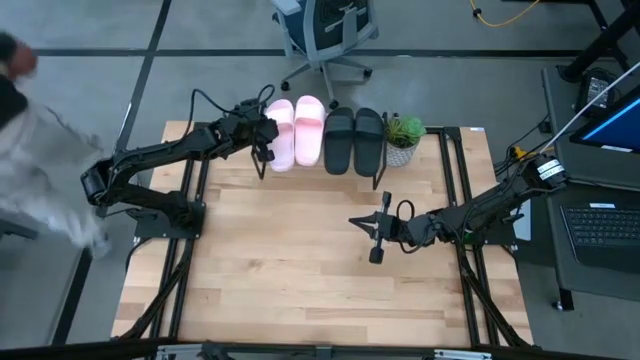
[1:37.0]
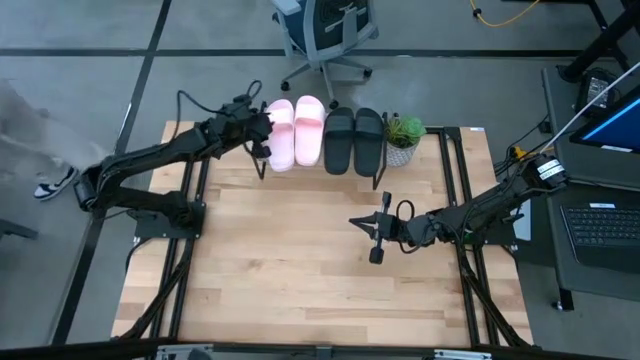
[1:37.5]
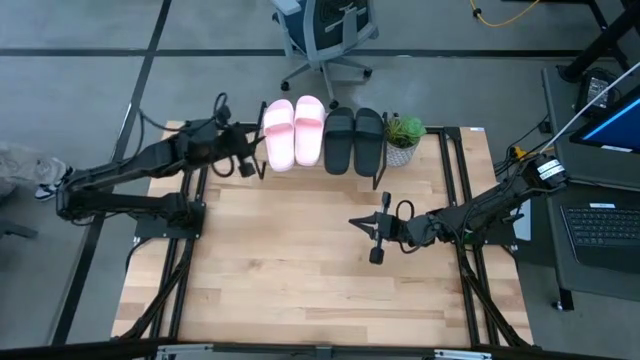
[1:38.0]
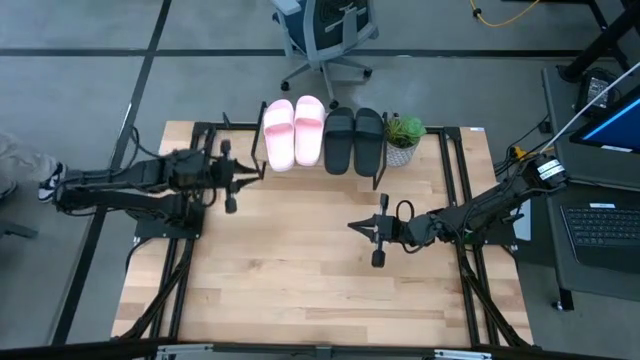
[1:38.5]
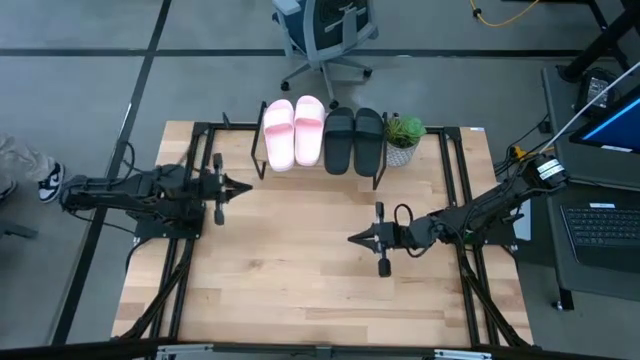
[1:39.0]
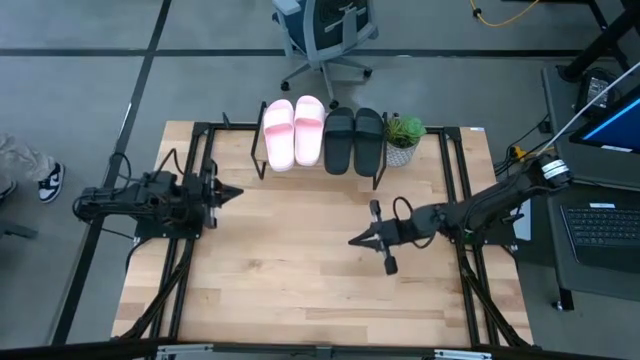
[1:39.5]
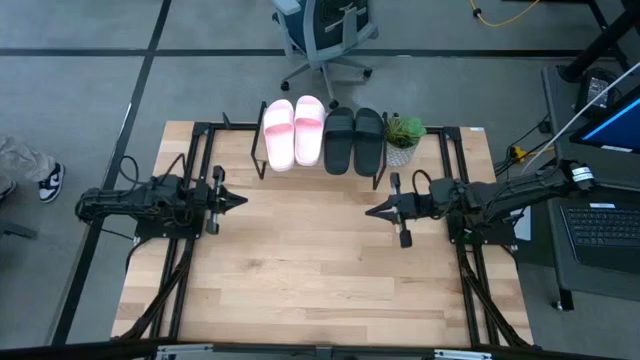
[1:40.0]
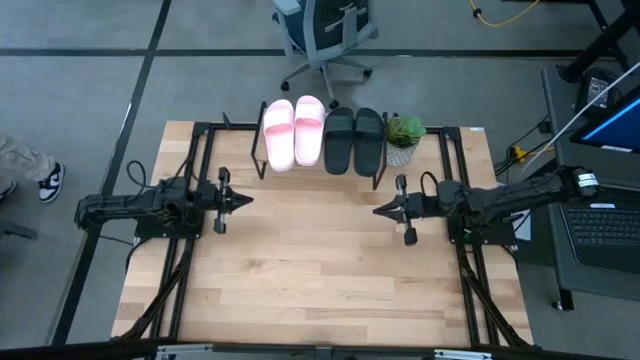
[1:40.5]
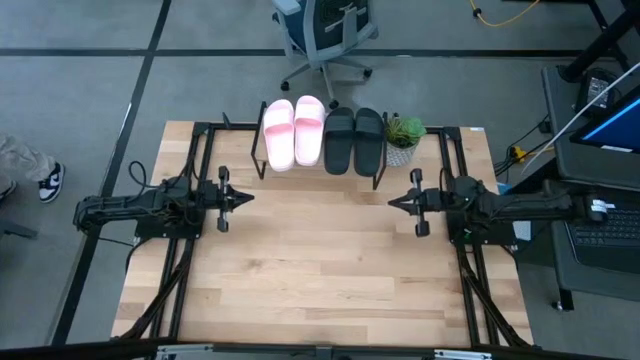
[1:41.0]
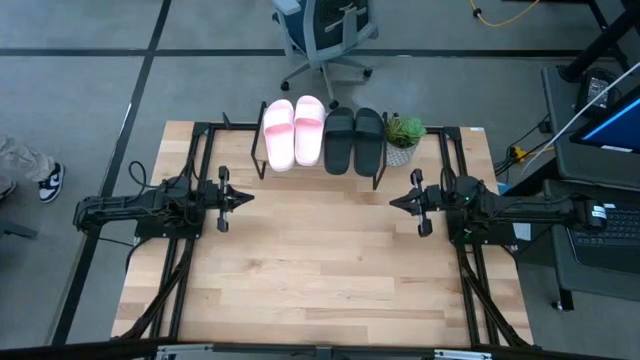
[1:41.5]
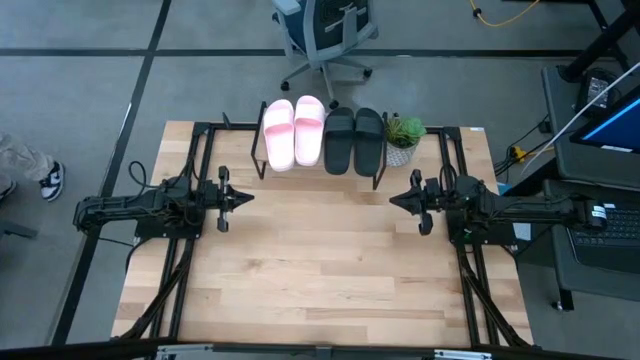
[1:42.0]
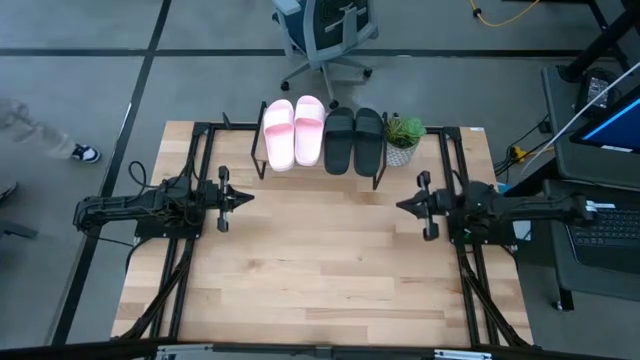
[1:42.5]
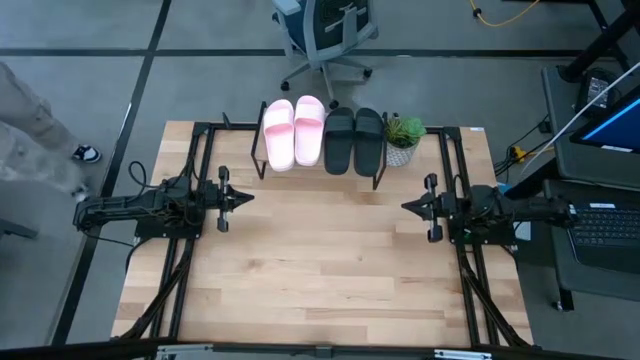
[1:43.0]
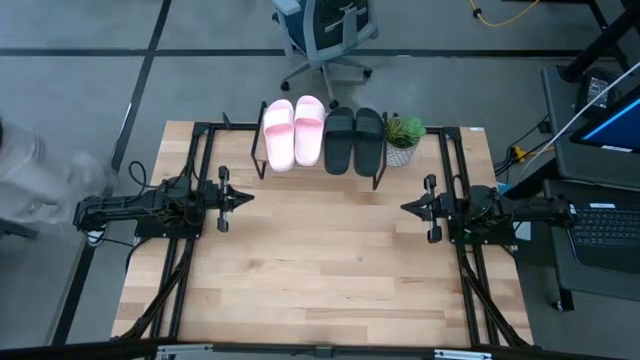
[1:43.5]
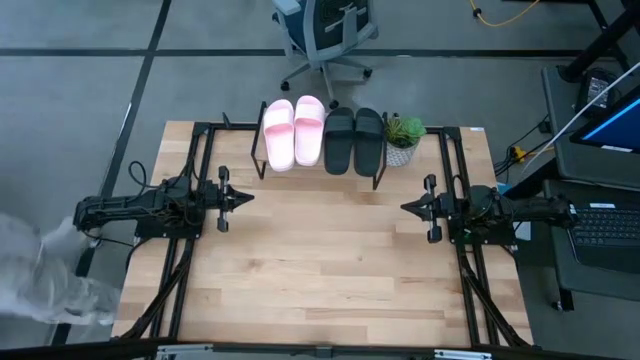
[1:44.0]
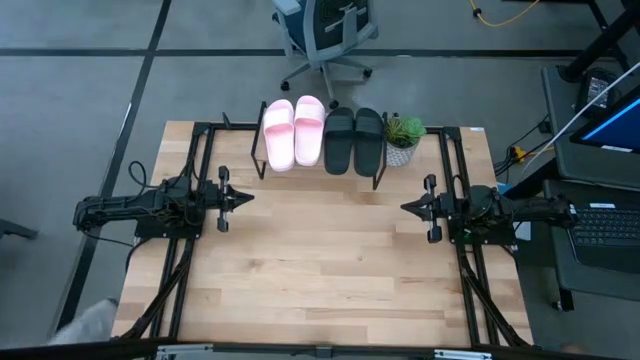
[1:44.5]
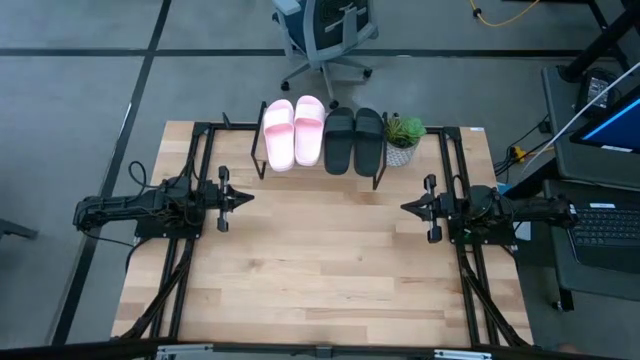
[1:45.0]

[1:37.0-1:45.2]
Task: Pick and place slides into the shelf
Return to Home Position

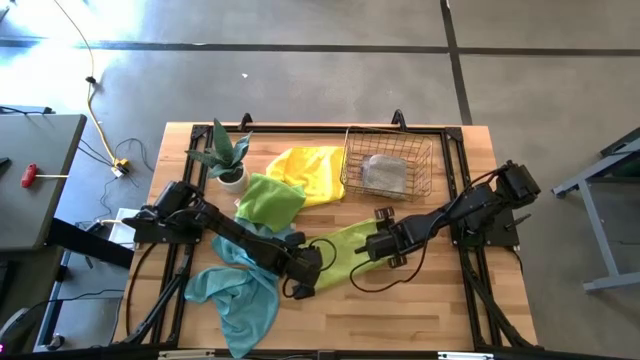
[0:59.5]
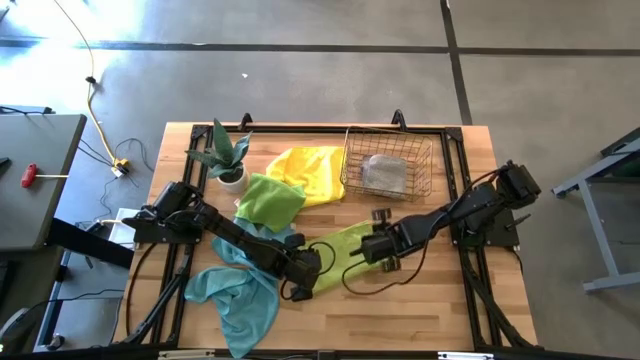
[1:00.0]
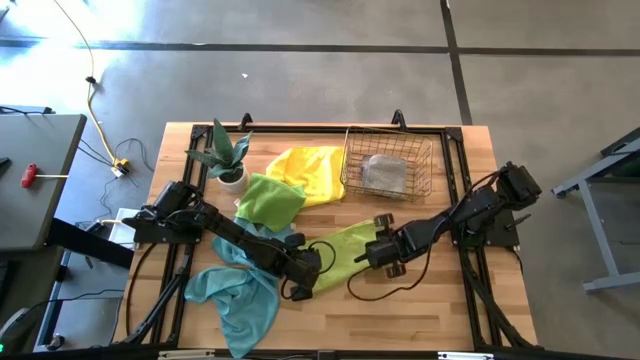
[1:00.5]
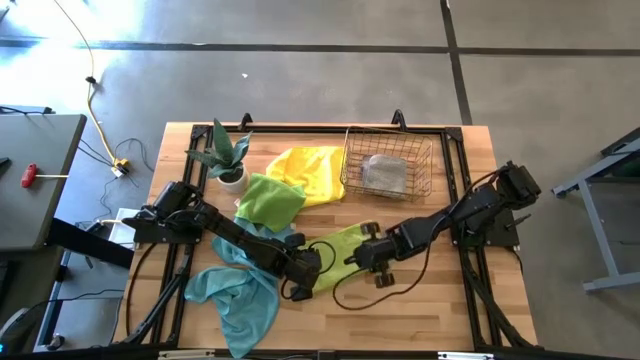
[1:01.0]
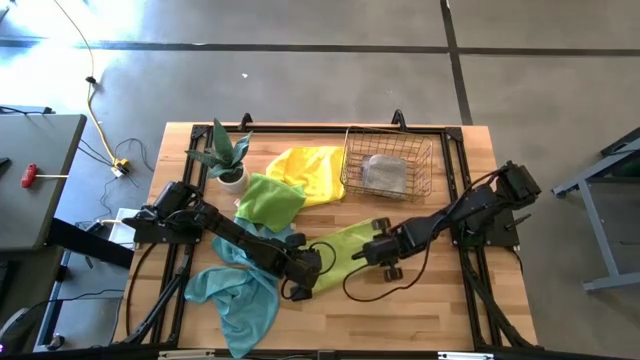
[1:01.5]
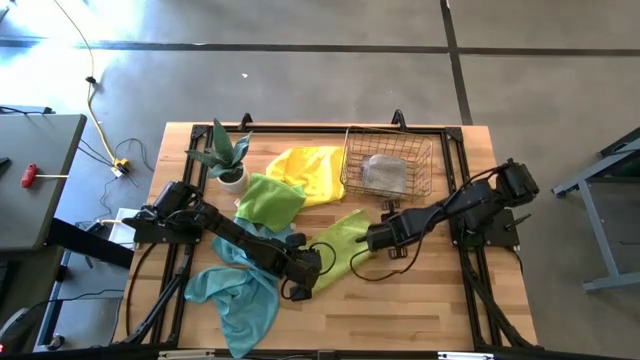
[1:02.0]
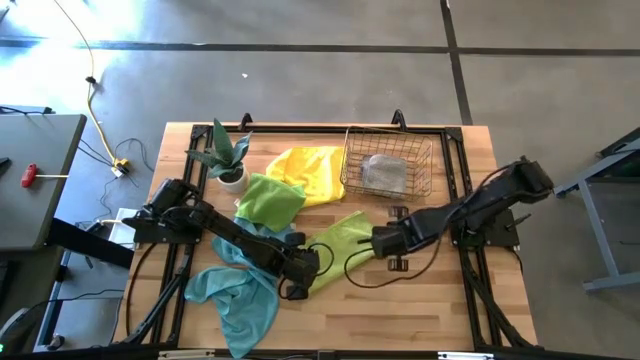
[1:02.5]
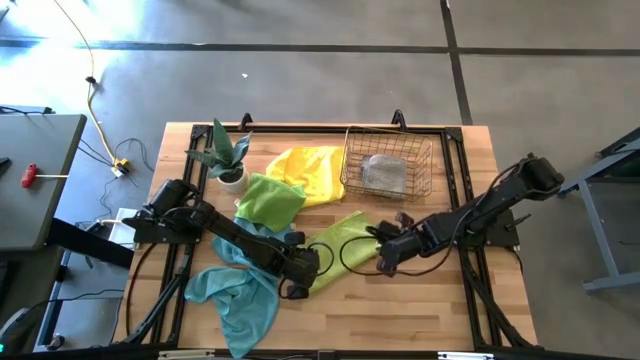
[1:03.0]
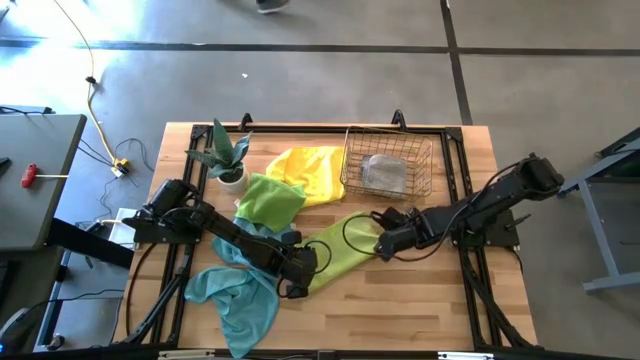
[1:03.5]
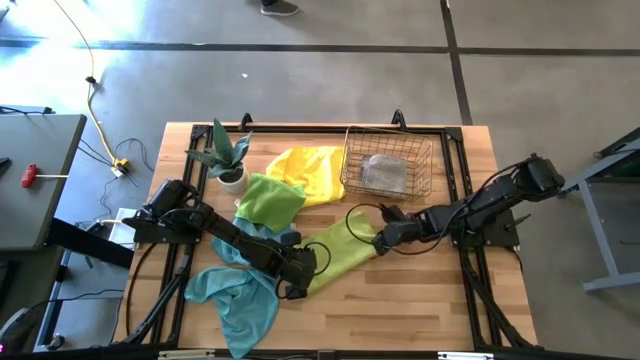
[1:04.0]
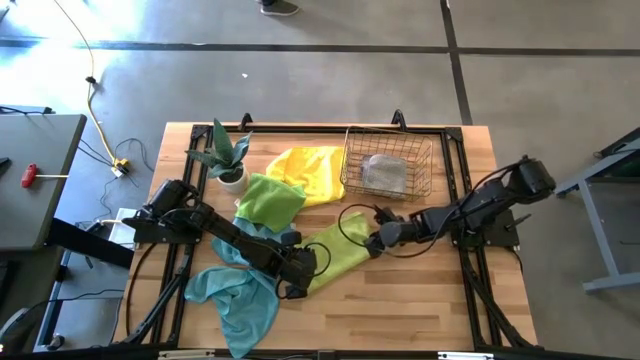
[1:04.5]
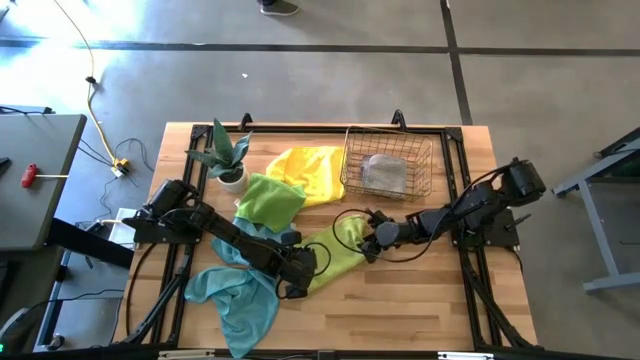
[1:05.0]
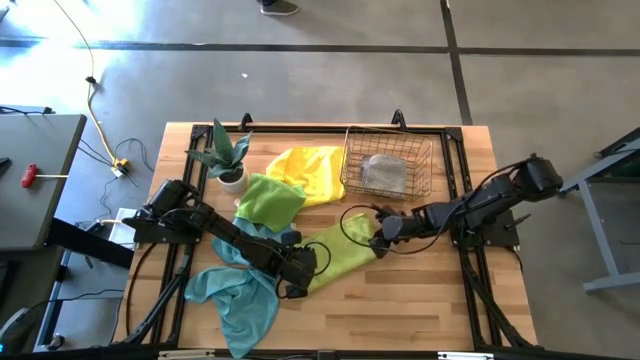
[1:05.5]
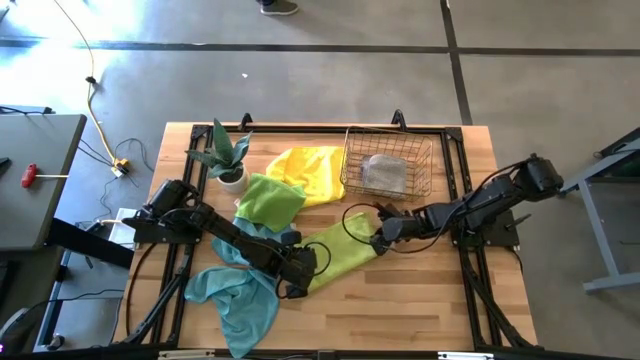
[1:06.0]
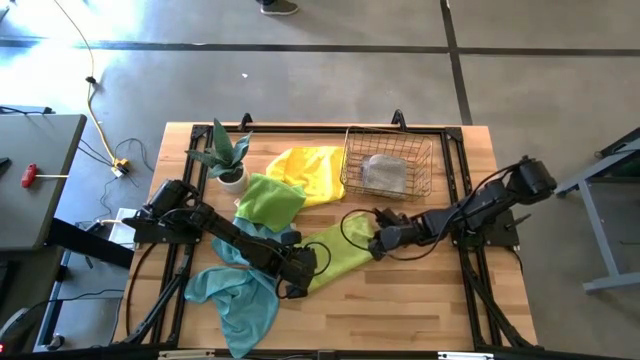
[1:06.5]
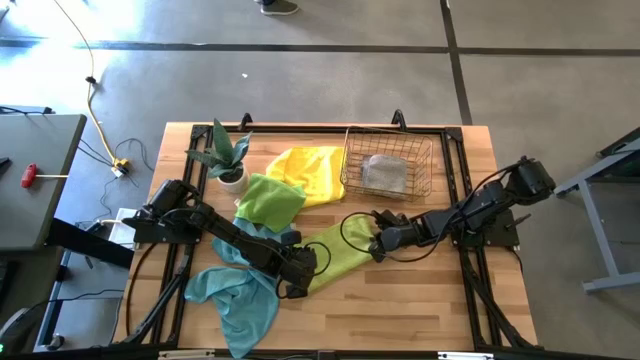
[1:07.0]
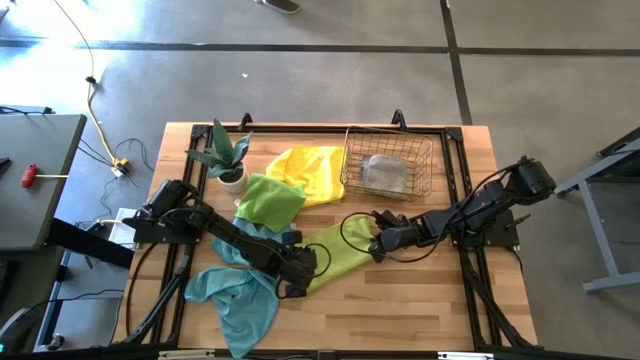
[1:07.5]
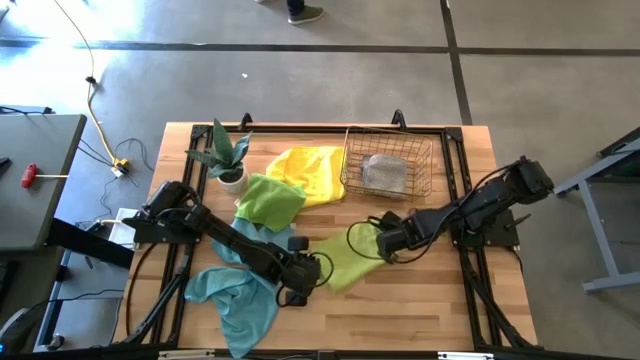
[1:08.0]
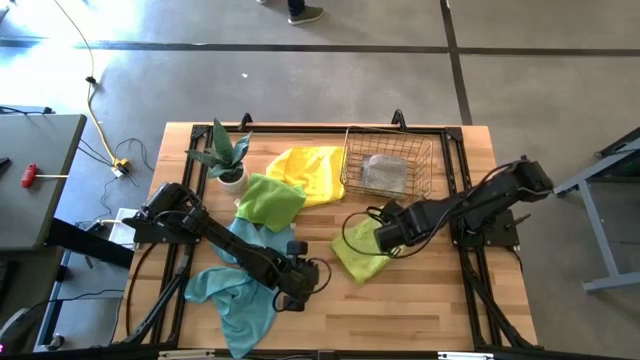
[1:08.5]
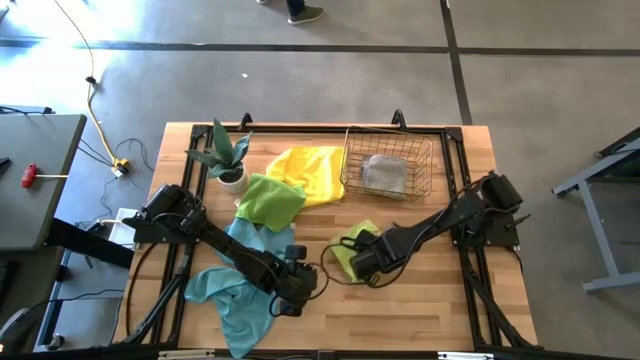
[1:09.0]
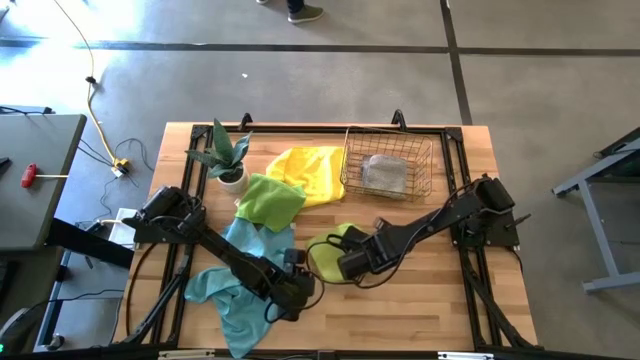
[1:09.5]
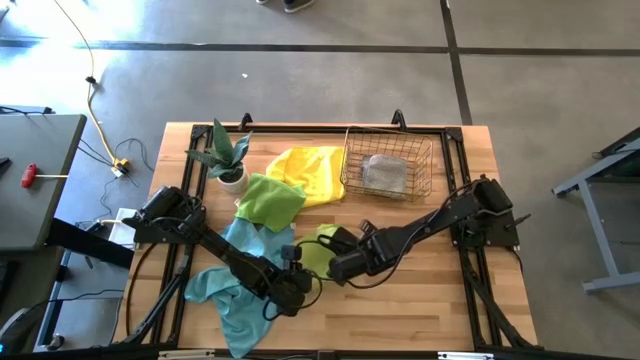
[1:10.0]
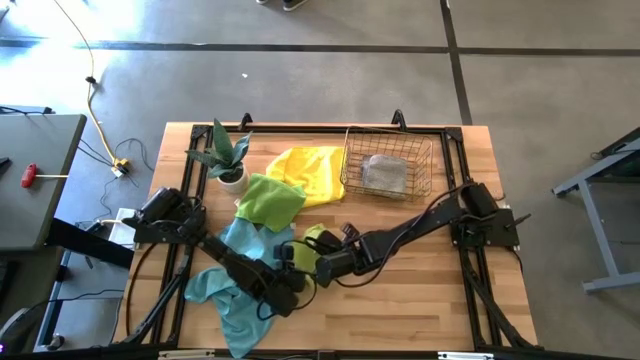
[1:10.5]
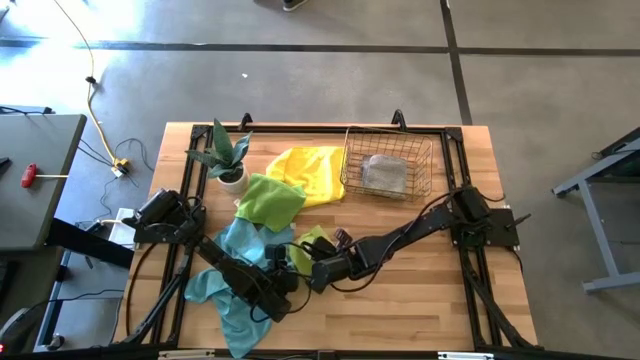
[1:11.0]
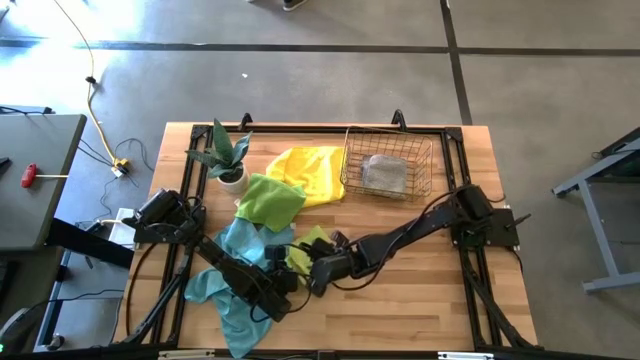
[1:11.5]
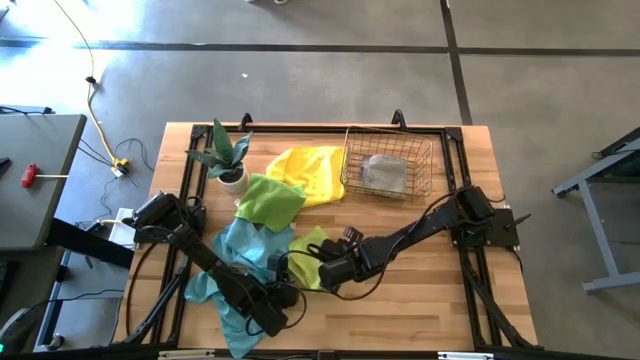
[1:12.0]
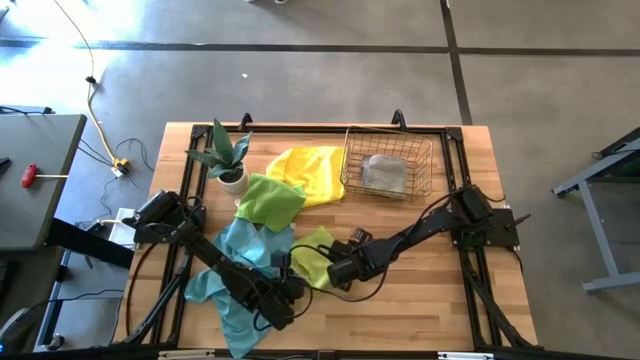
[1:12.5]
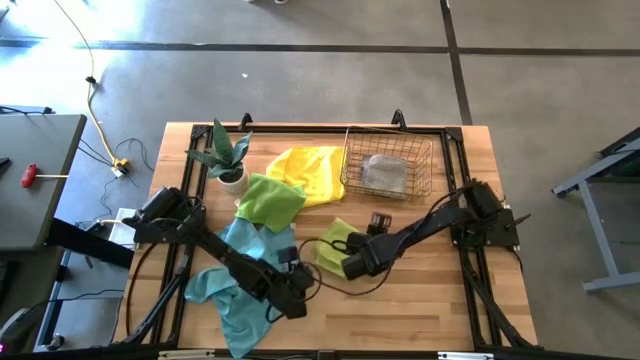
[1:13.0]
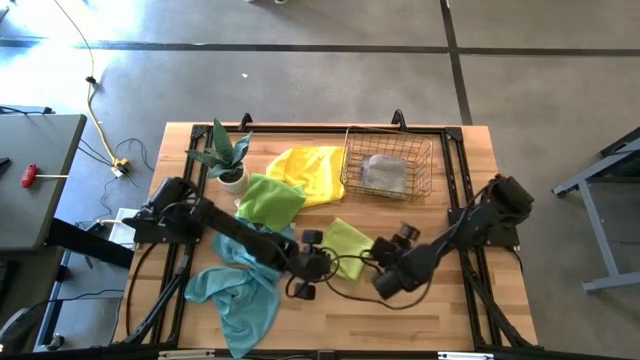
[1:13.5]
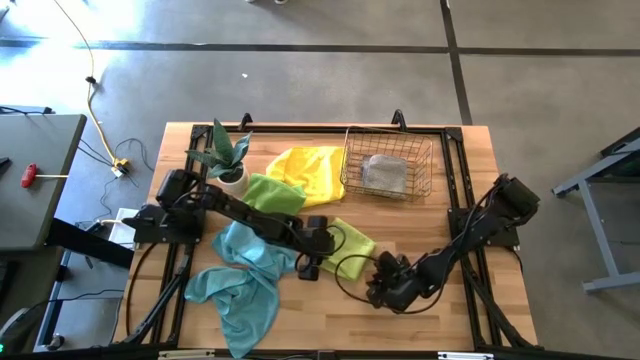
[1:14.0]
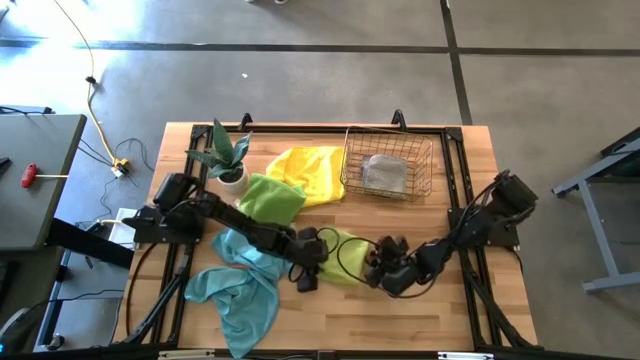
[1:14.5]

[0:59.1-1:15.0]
Task: Fold microfiber towels
Fold the light green microfiber towel
